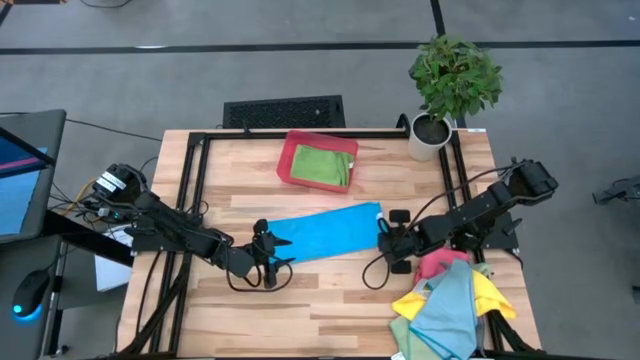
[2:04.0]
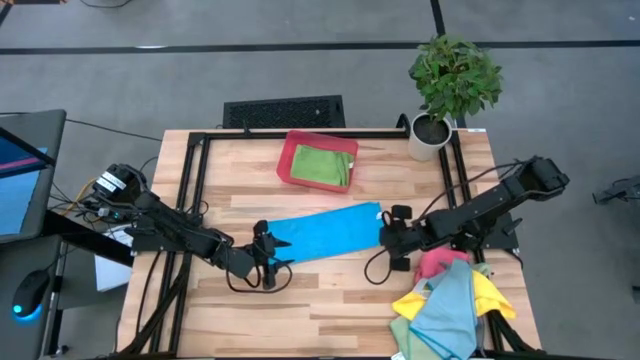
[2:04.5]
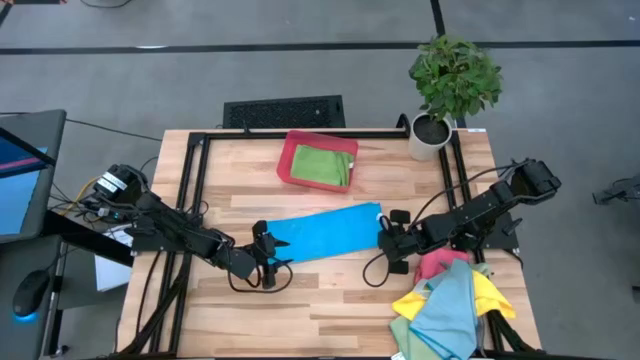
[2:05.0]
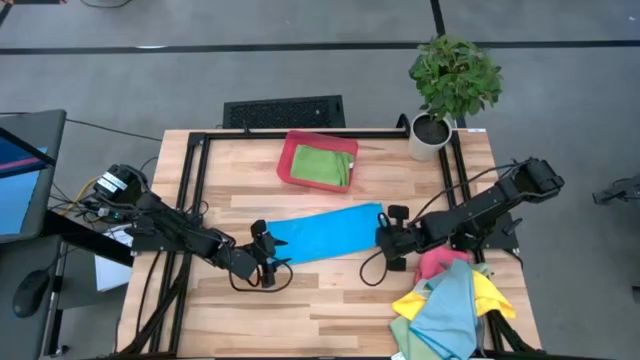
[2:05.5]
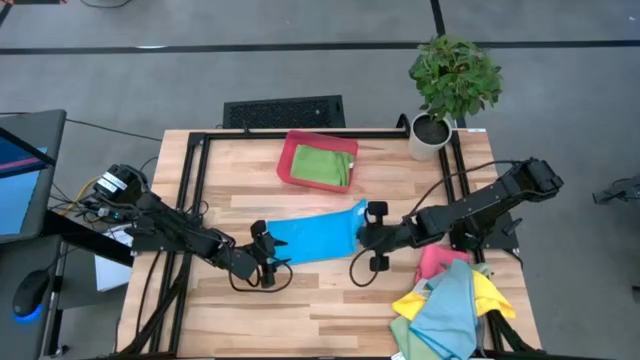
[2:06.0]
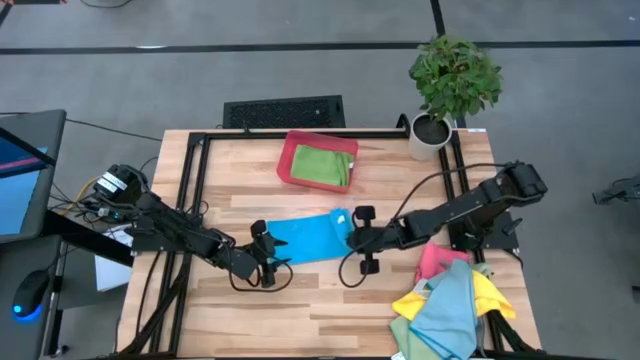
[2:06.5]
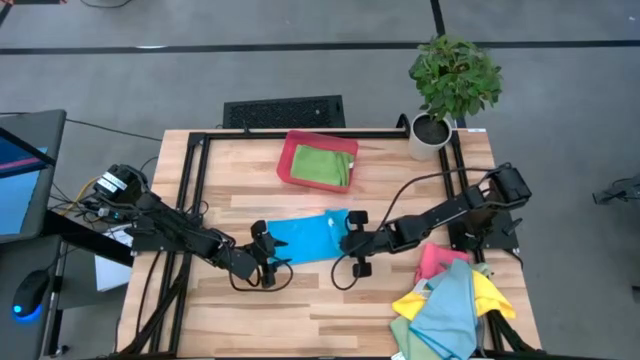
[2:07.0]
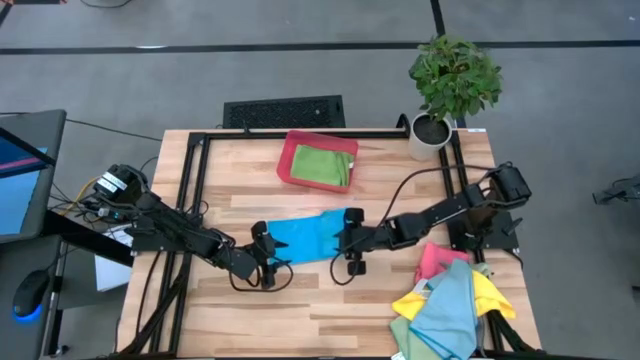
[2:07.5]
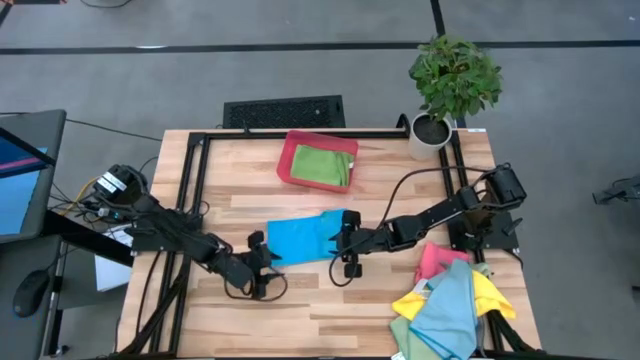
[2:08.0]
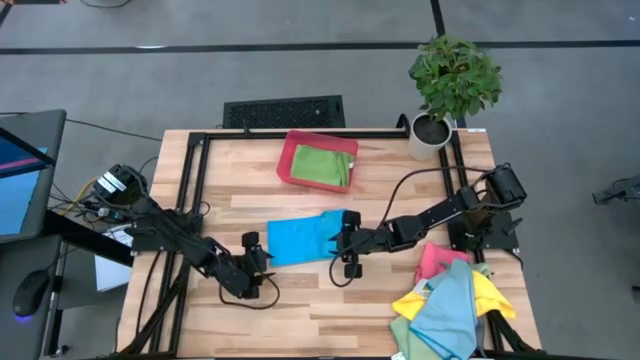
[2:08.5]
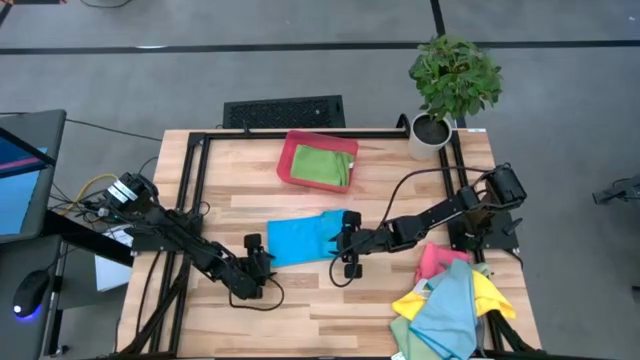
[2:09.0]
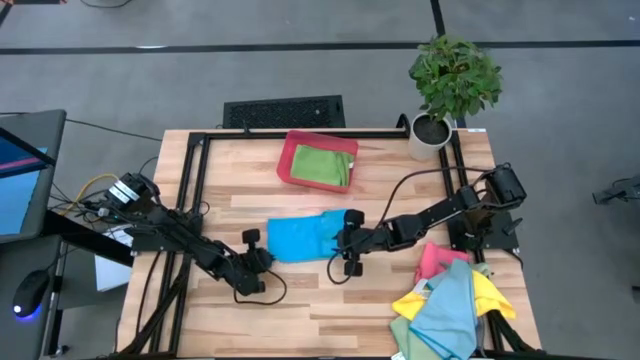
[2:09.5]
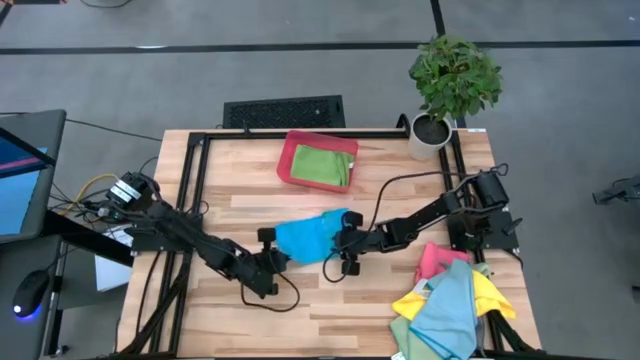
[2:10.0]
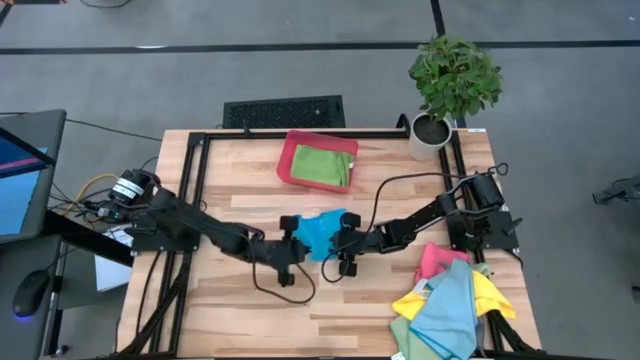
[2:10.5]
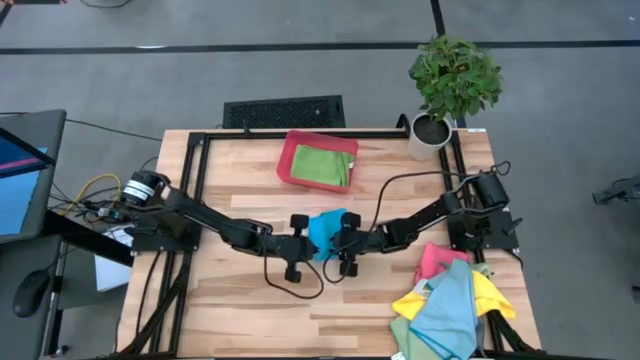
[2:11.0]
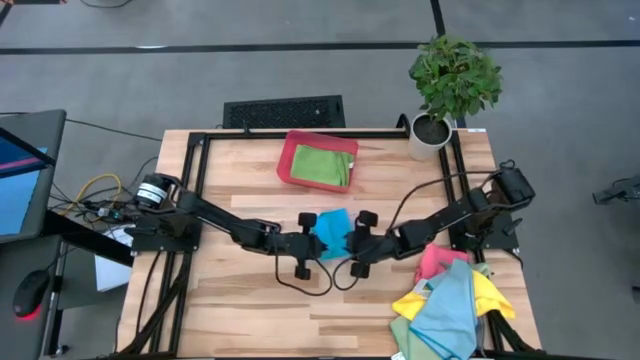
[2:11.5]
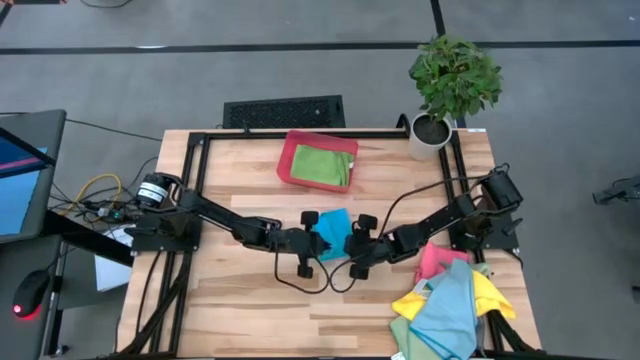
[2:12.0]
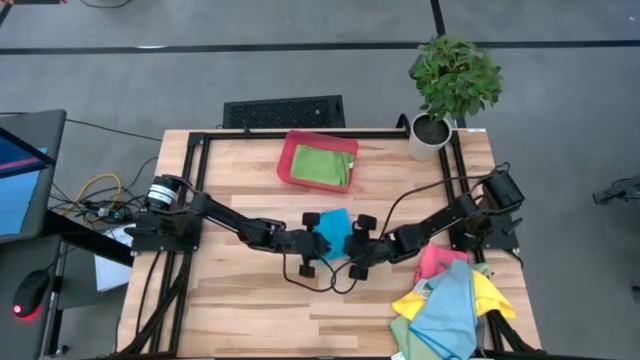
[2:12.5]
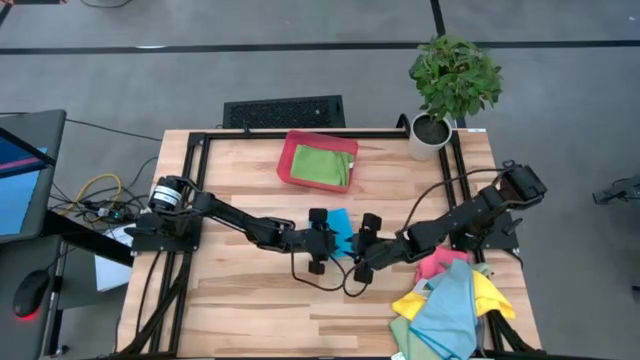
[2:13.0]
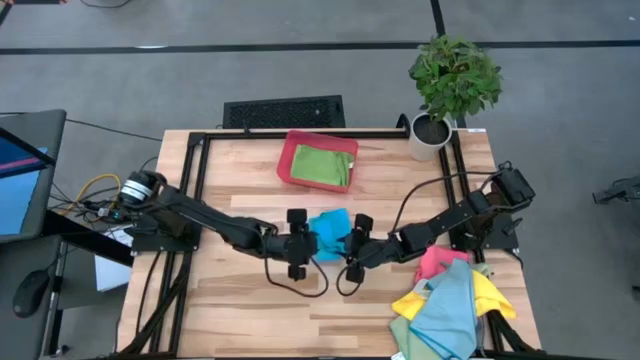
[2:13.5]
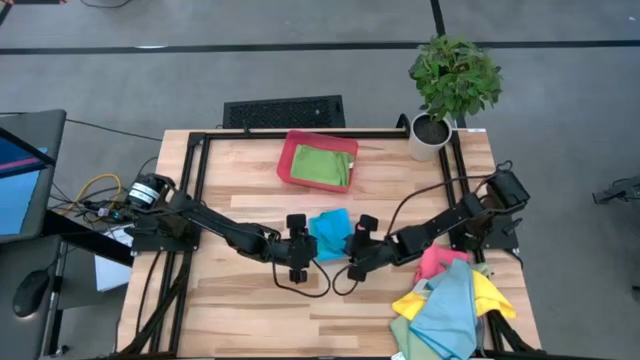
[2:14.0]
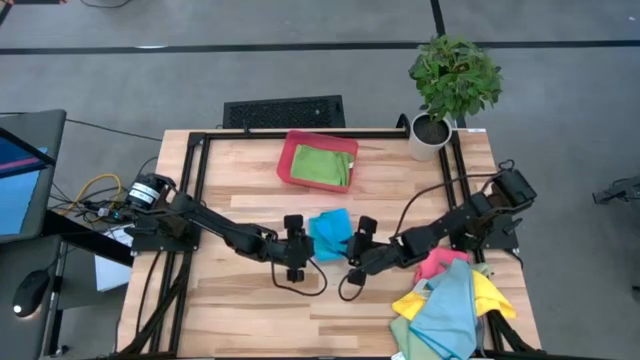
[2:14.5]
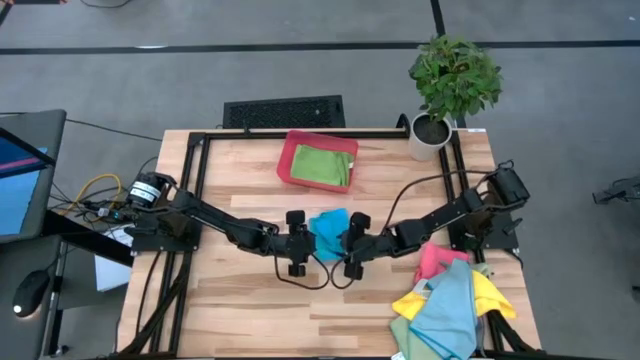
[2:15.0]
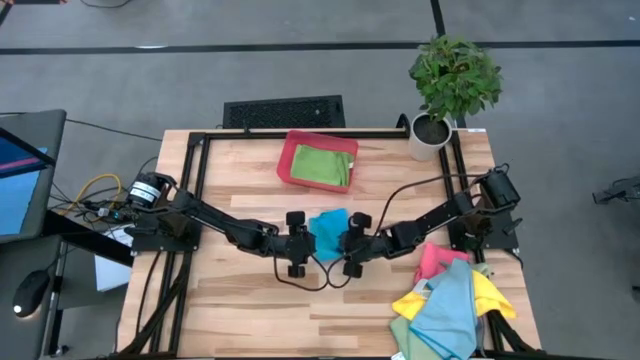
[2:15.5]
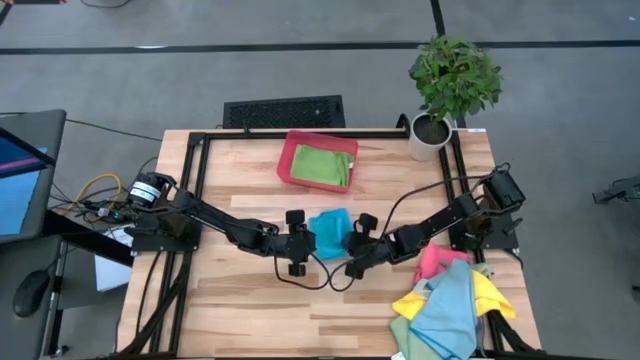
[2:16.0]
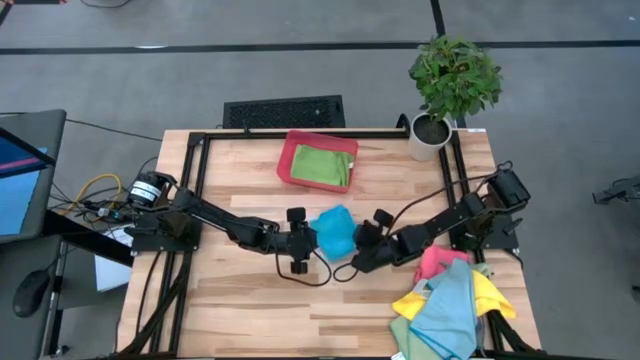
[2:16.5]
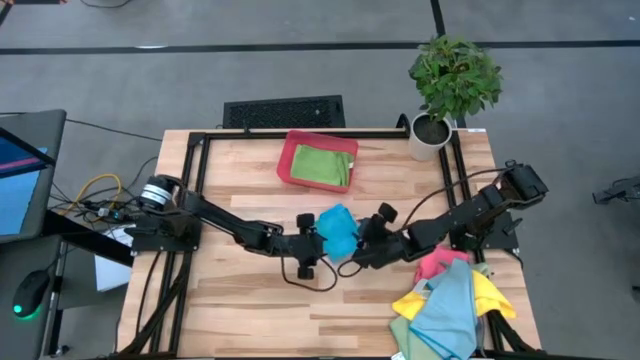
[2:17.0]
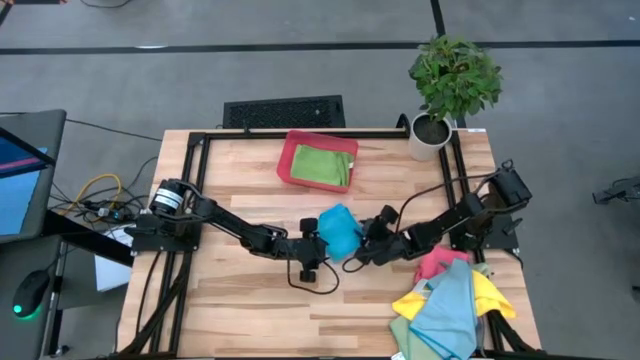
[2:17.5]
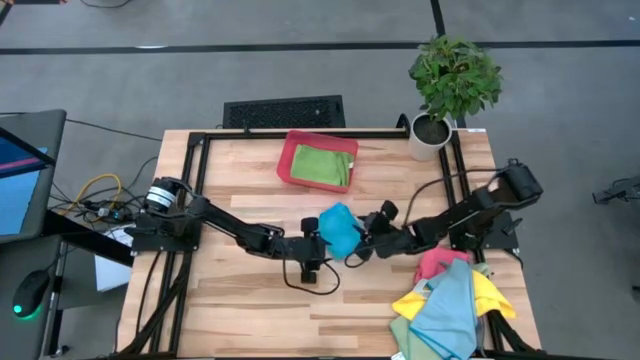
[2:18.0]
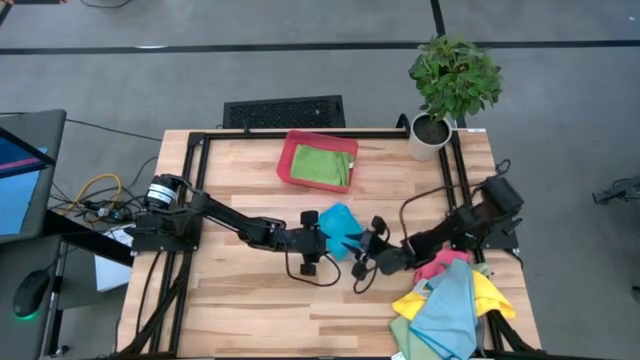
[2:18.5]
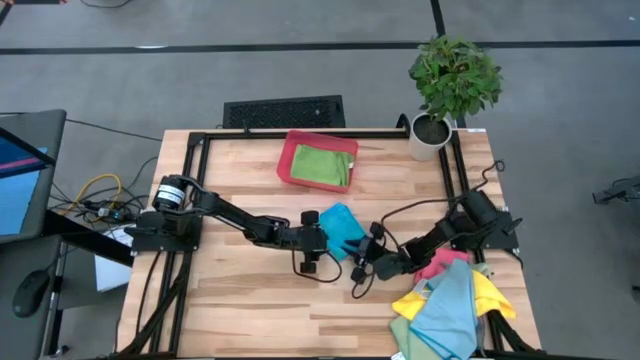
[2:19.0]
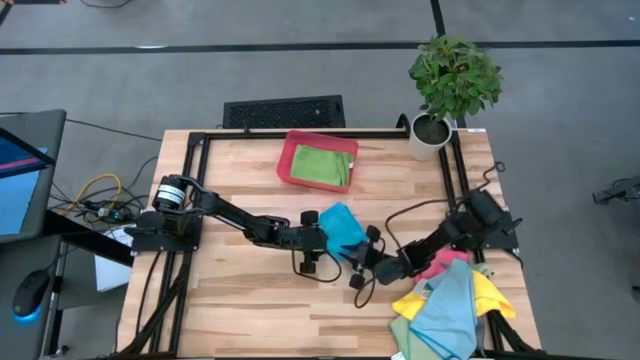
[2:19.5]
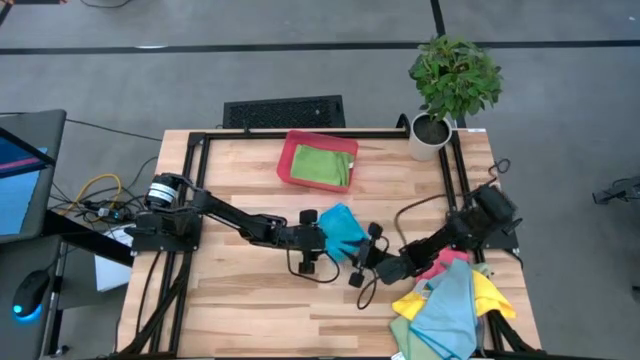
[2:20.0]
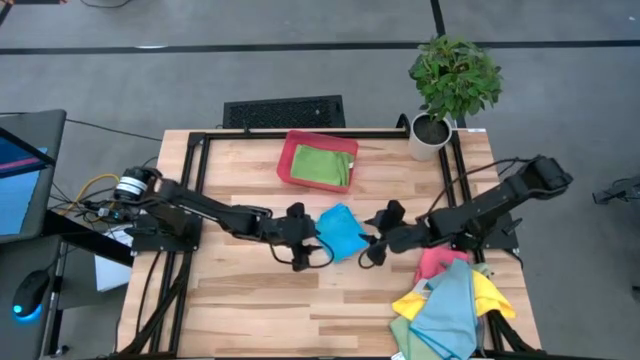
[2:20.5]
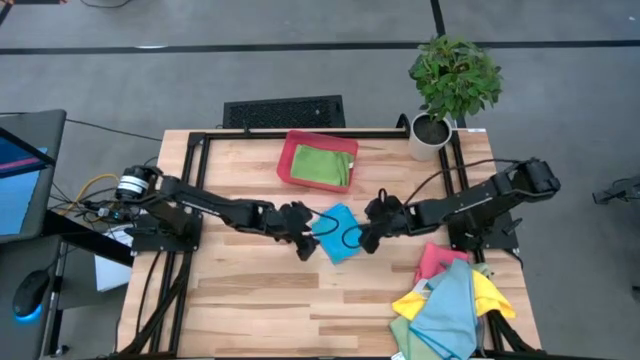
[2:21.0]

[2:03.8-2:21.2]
Task: Fold microfiber towels
Fold the blue microfiber cloth

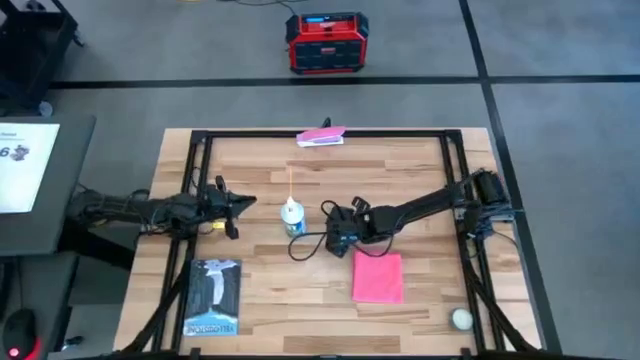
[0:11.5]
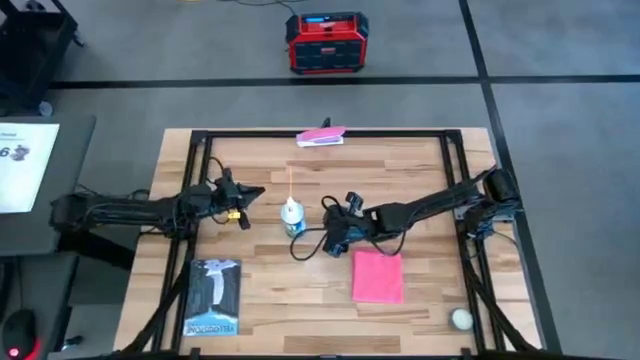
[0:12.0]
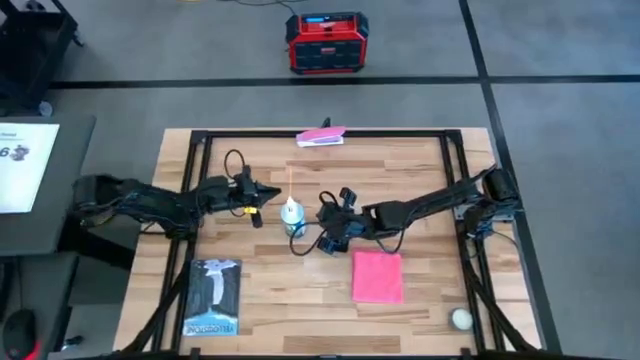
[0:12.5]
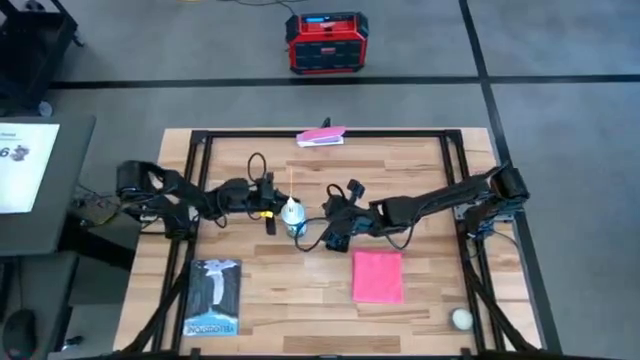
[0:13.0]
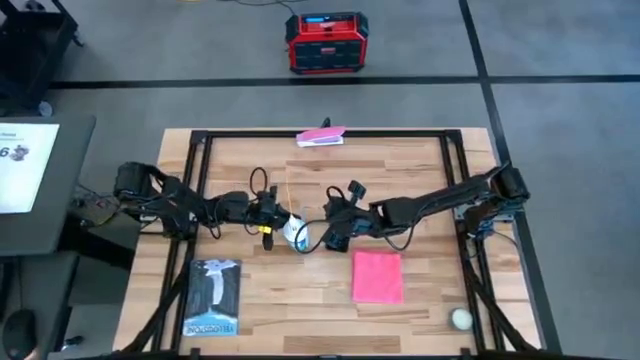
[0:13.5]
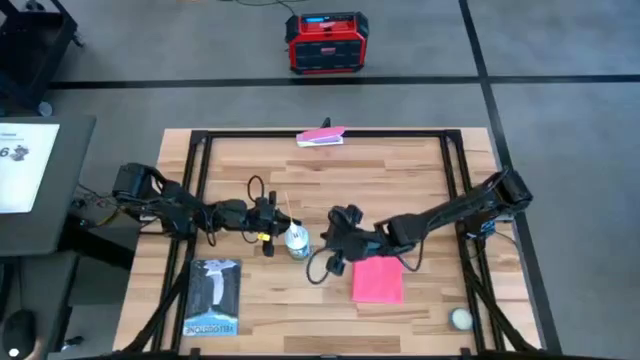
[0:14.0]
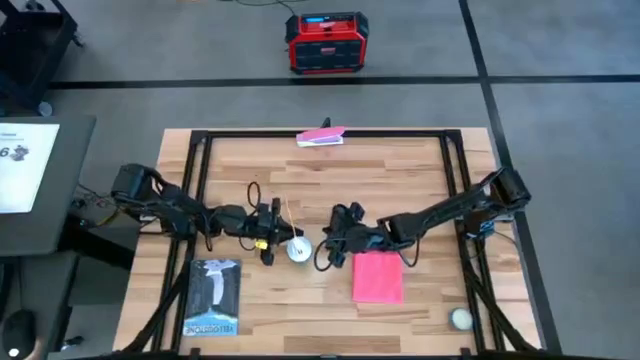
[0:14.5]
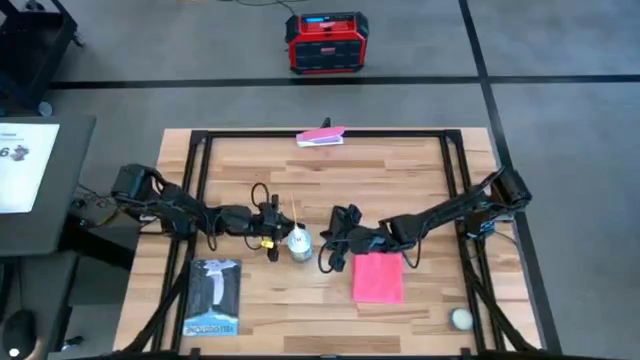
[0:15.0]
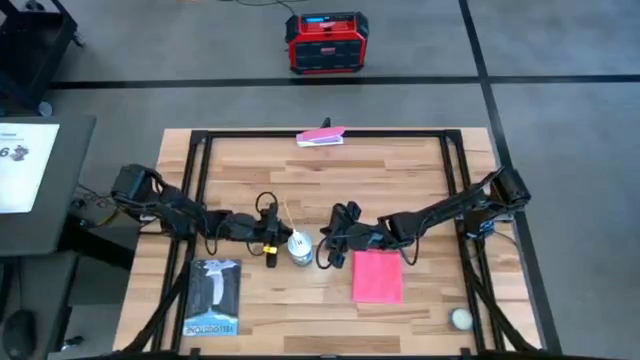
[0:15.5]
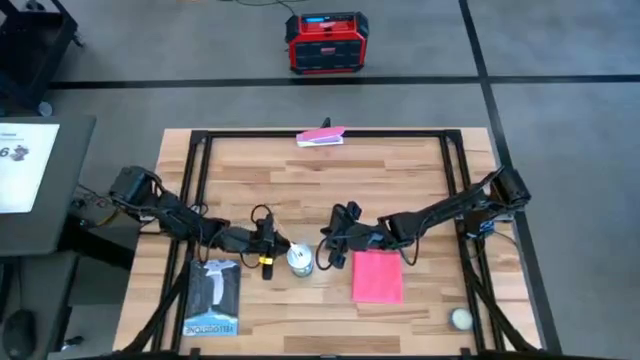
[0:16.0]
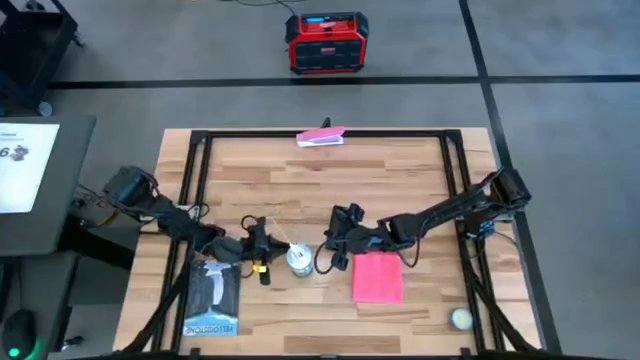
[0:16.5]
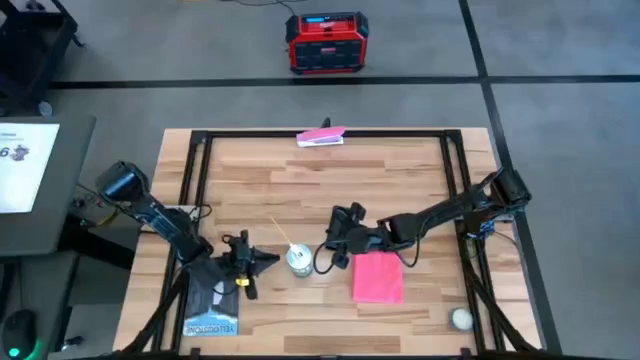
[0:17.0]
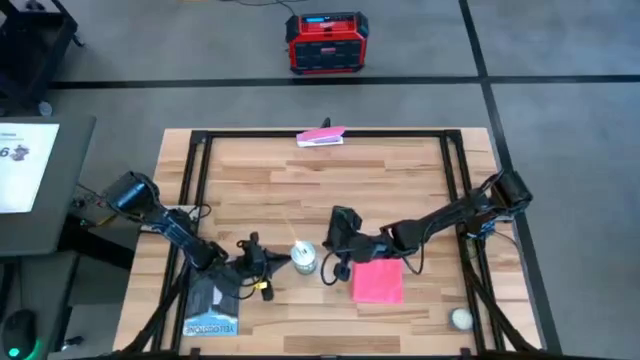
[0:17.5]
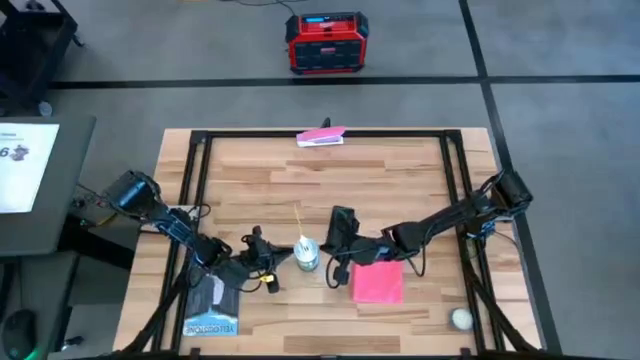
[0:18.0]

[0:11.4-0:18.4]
Task: Apply microfiber cloth
Adjust the white spray bottle on the table
